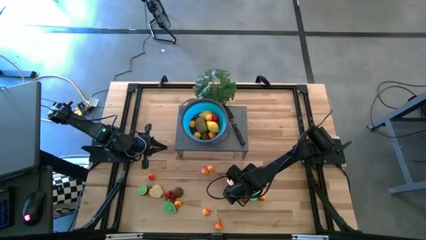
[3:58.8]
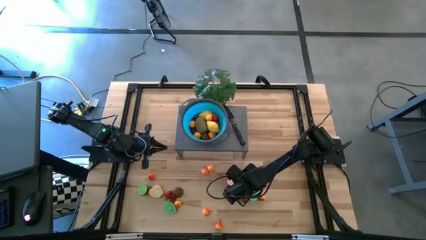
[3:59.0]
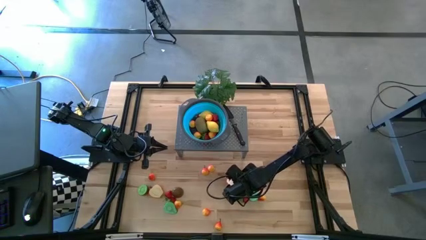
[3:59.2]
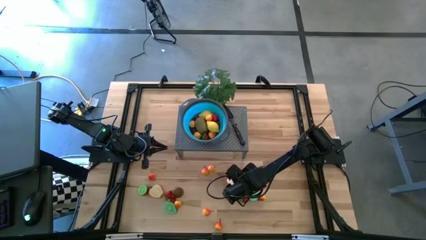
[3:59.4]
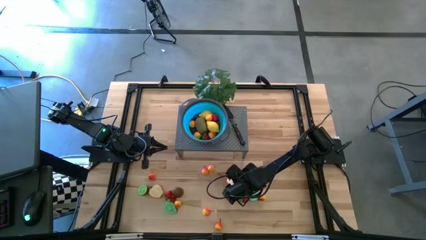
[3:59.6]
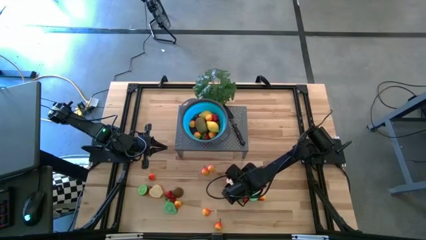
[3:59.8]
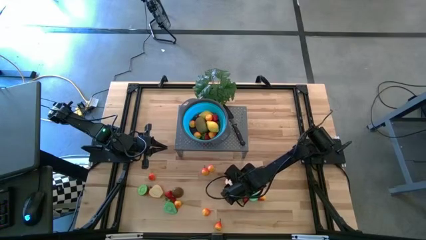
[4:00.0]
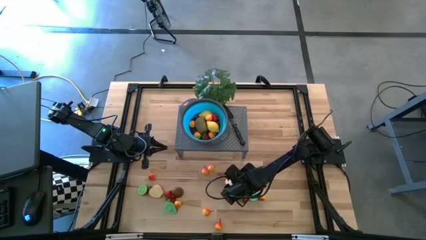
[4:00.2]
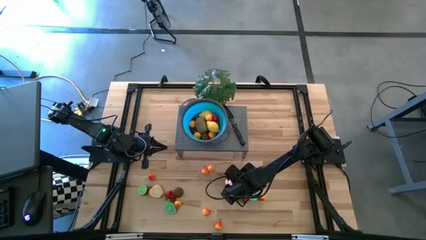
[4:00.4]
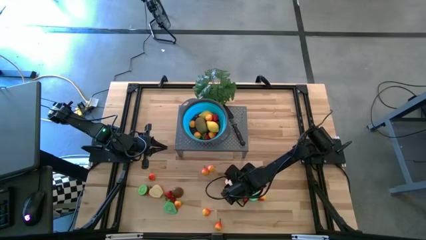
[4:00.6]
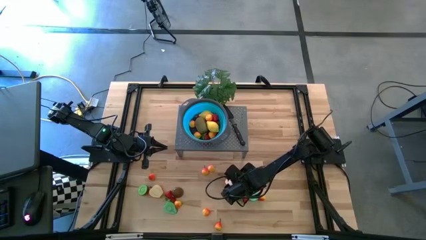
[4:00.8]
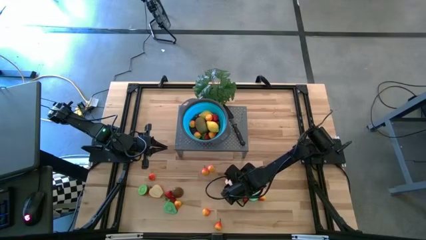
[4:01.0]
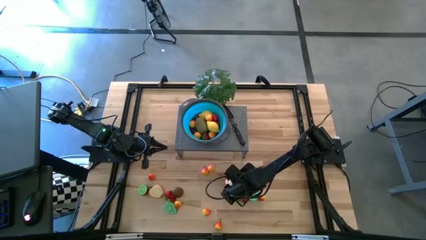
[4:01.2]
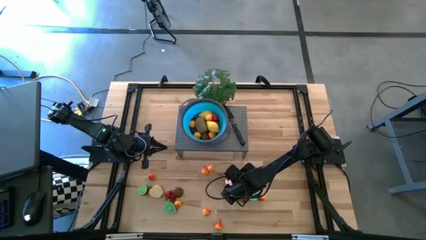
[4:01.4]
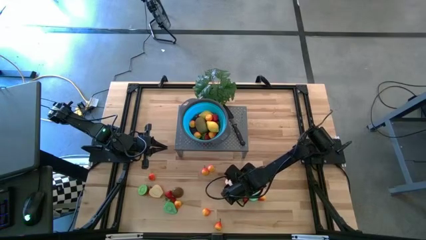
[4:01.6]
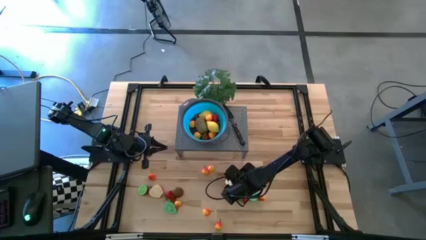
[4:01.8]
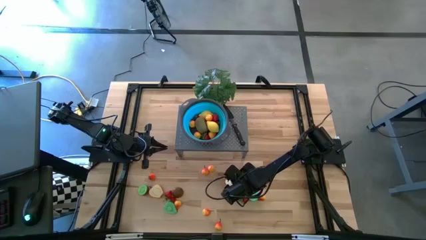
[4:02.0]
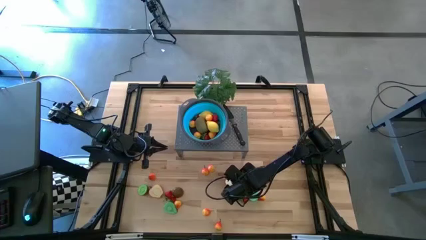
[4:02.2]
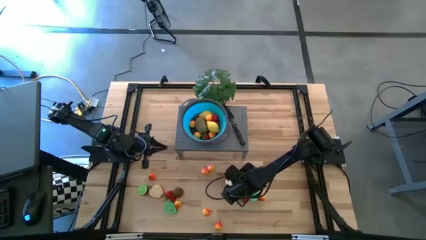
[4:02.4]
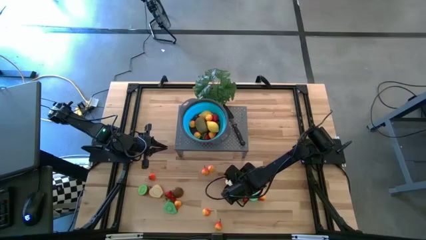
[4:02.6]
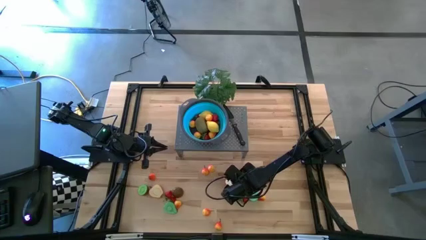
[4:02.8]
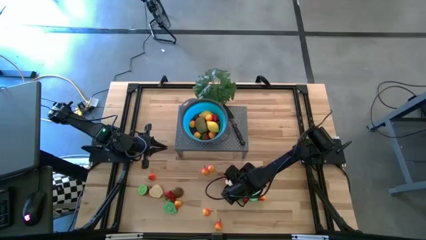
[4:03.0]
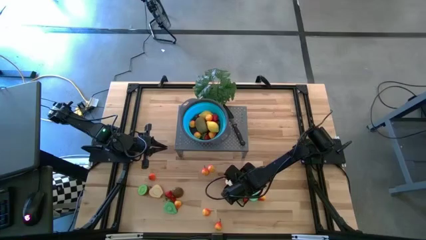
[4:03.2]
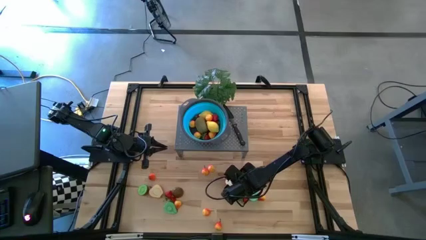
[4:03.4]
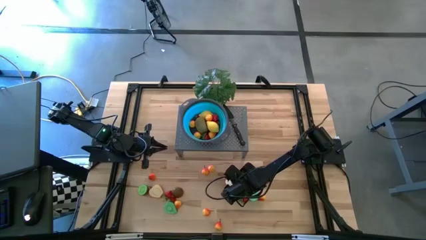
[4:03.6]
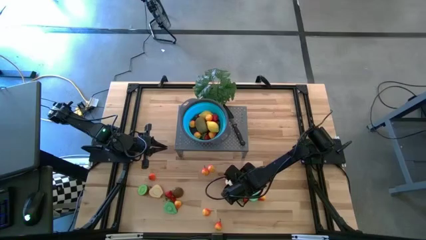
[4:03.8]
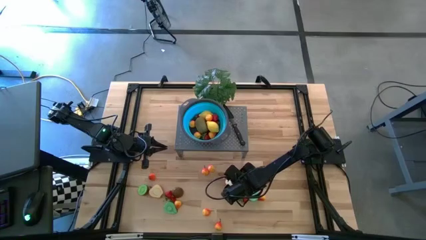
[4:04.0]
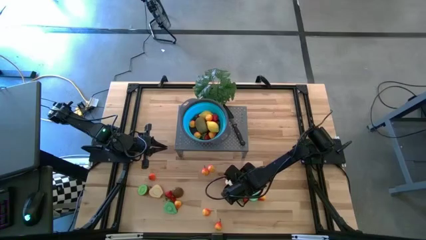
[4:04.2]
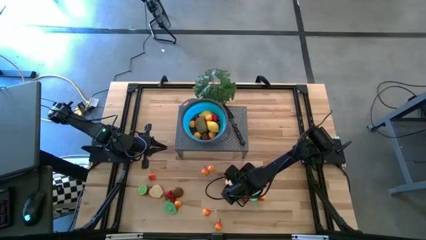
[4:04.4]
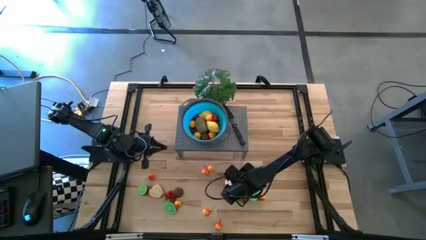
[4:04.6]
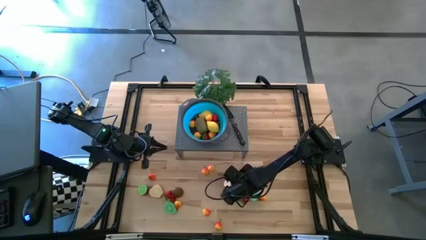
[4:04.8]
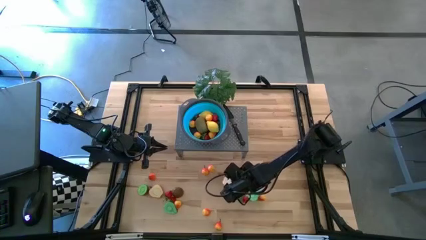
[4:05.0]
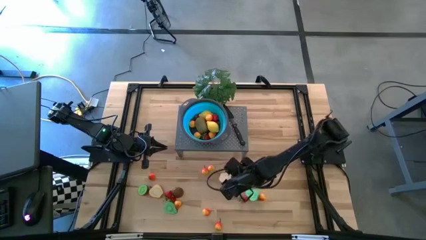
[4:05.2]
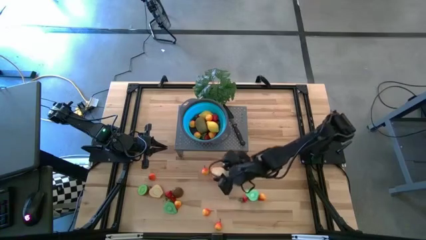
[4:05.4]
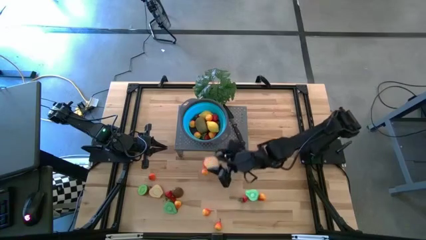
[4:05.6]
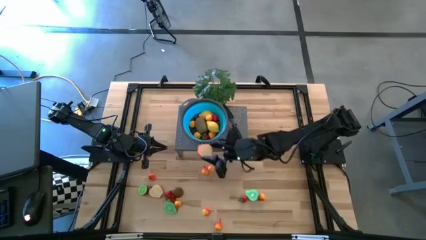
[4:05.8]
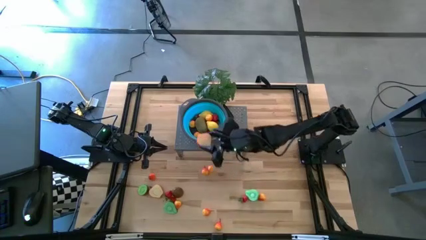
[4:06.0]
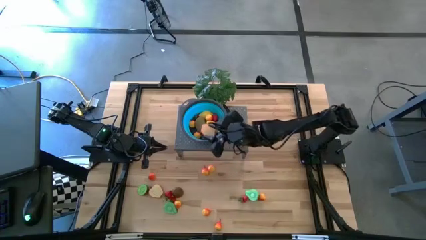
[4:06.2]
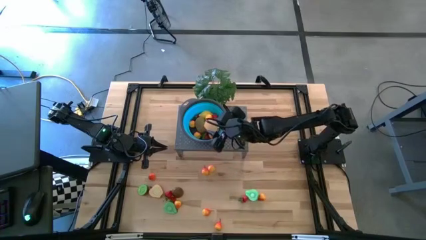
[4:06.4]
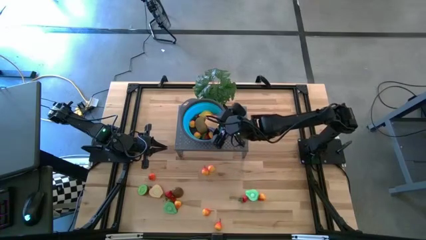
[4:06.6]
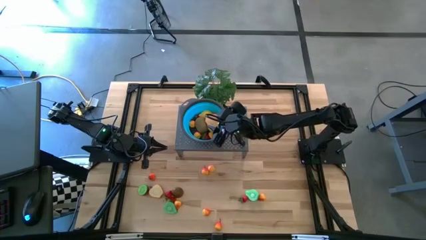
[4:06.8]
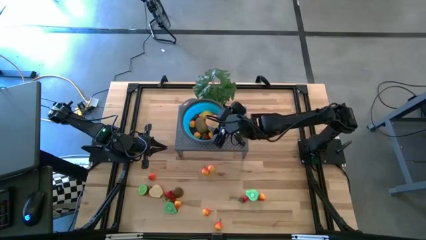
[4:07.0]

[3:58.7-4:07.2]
Task: Pick & Place Fruit
Put the apple into the blue strainer bowl on the shelf

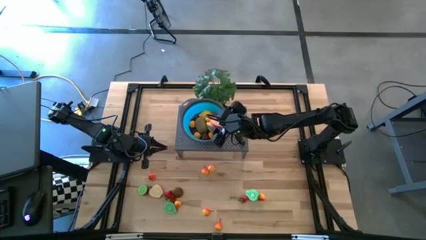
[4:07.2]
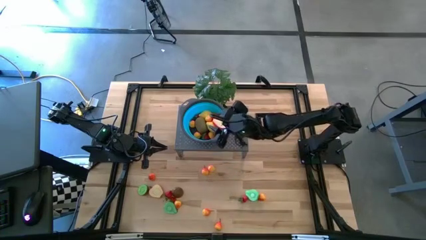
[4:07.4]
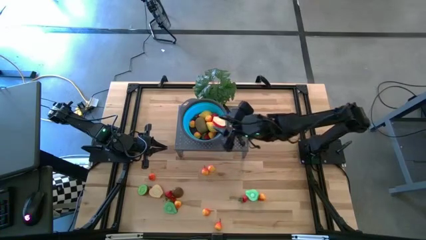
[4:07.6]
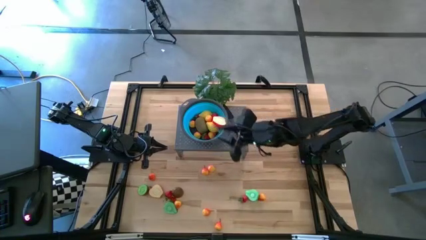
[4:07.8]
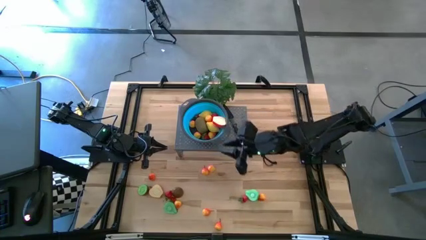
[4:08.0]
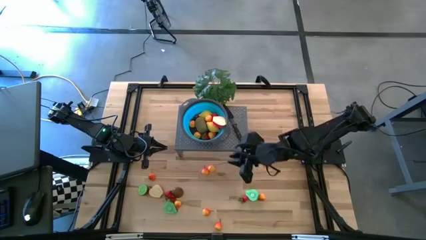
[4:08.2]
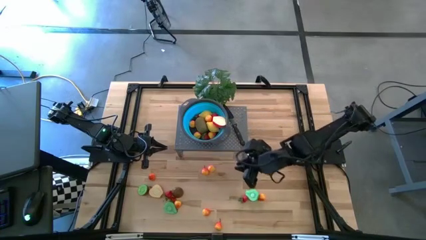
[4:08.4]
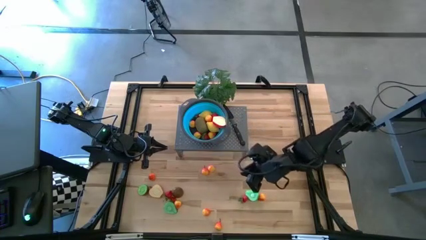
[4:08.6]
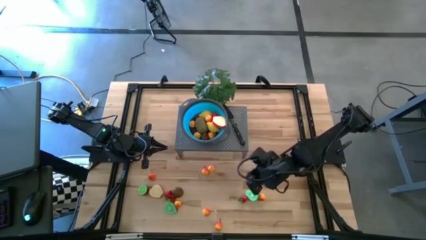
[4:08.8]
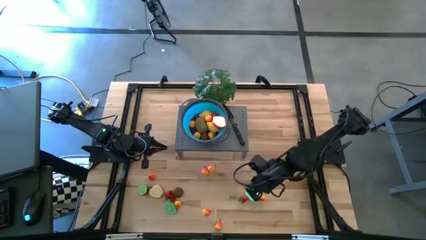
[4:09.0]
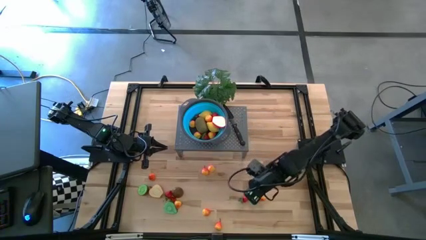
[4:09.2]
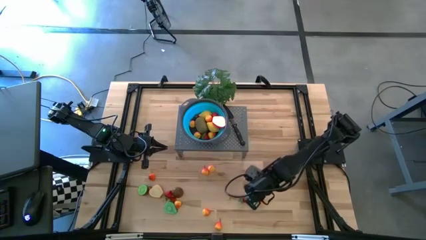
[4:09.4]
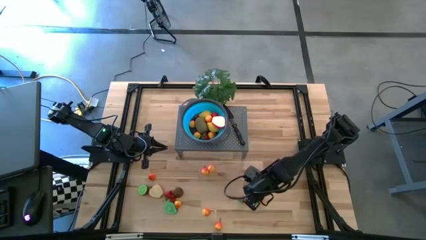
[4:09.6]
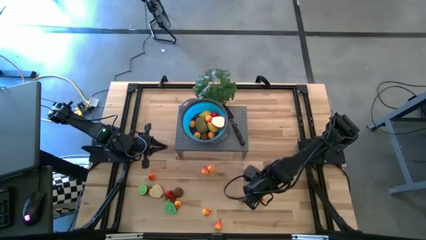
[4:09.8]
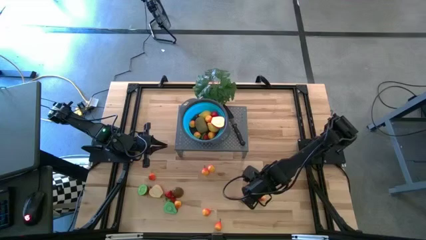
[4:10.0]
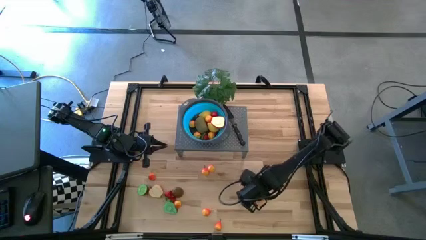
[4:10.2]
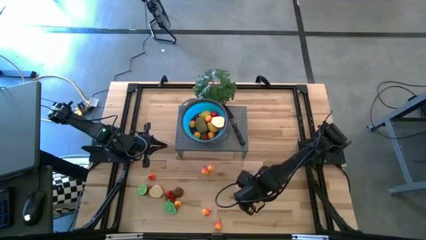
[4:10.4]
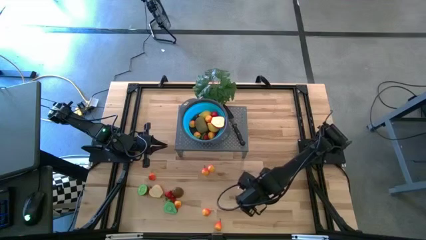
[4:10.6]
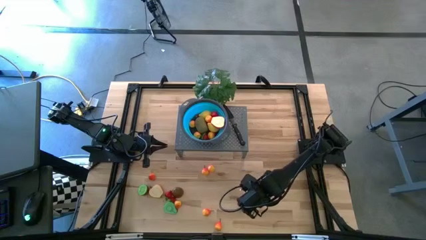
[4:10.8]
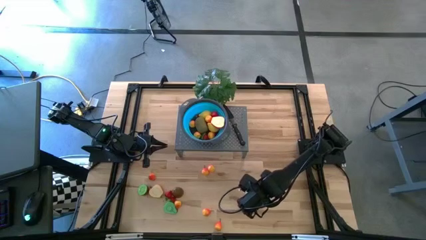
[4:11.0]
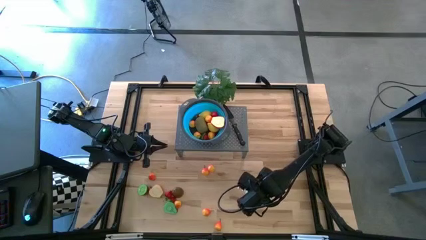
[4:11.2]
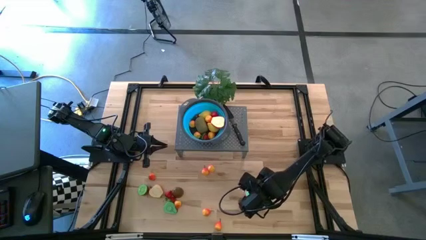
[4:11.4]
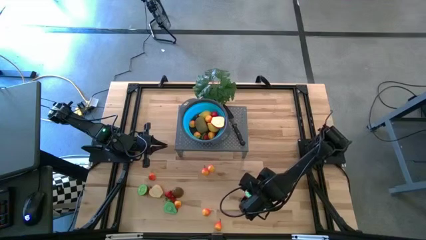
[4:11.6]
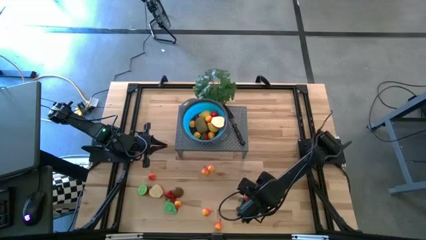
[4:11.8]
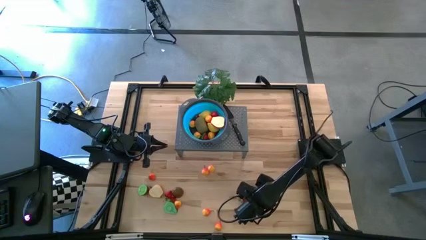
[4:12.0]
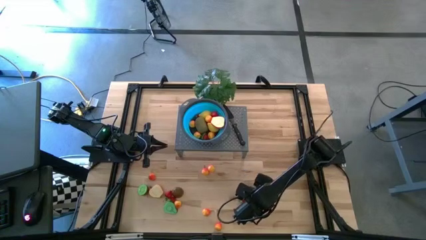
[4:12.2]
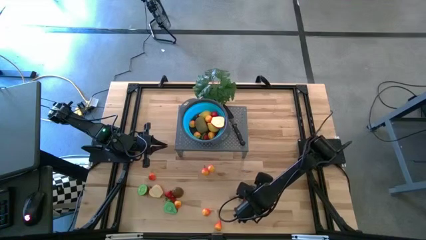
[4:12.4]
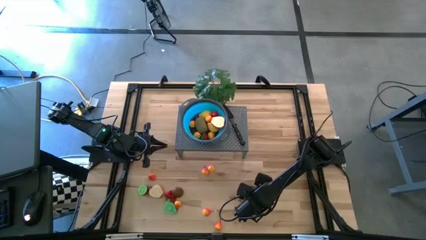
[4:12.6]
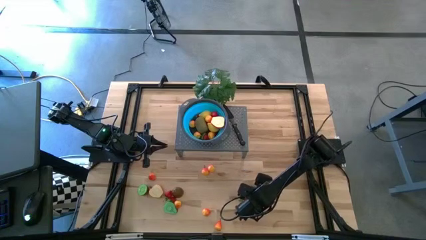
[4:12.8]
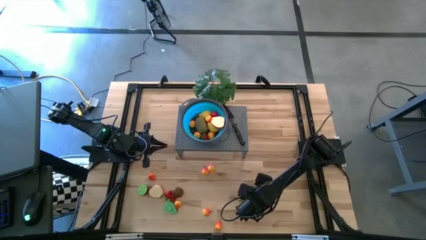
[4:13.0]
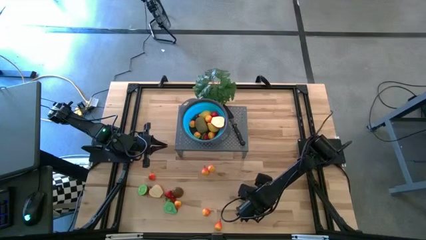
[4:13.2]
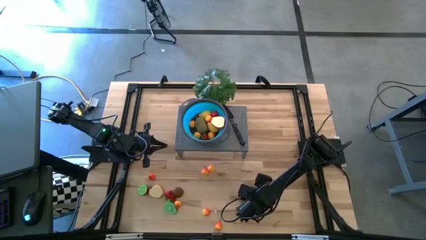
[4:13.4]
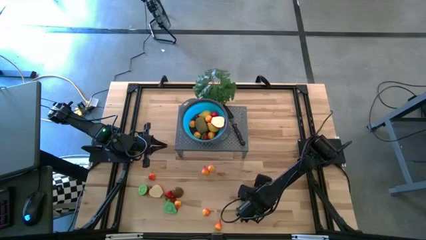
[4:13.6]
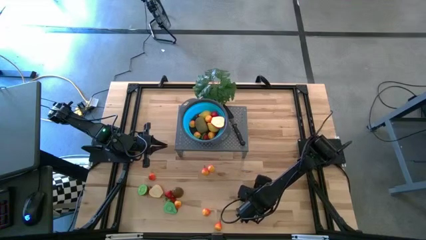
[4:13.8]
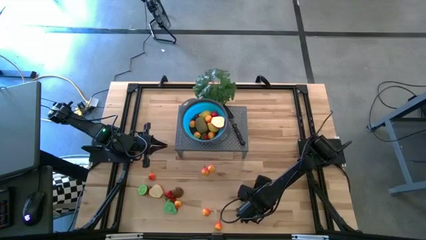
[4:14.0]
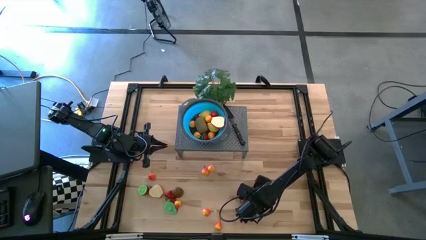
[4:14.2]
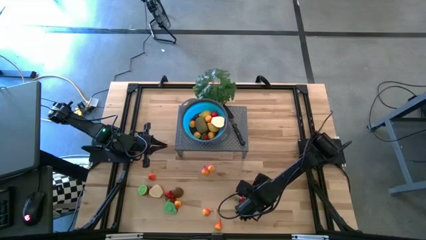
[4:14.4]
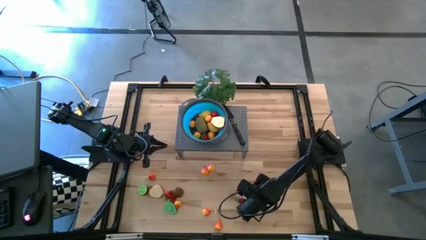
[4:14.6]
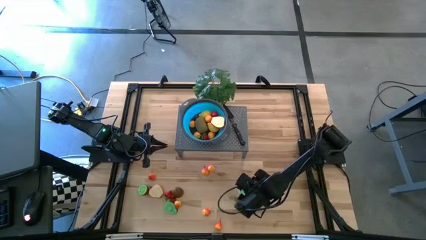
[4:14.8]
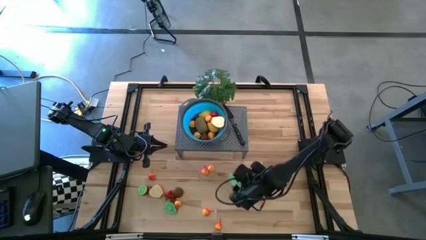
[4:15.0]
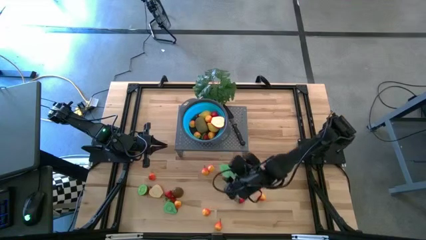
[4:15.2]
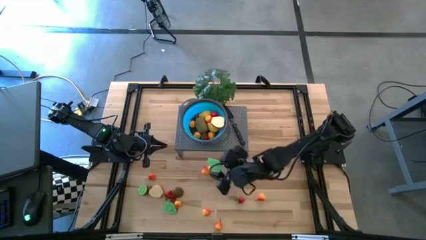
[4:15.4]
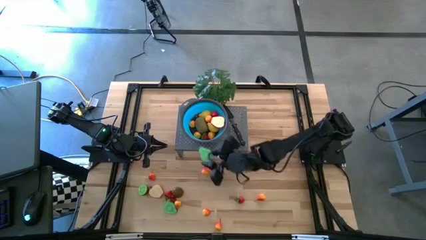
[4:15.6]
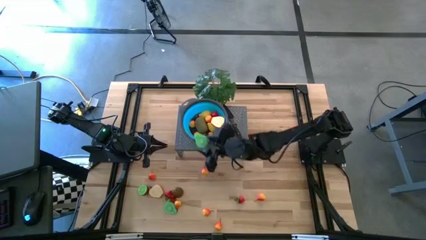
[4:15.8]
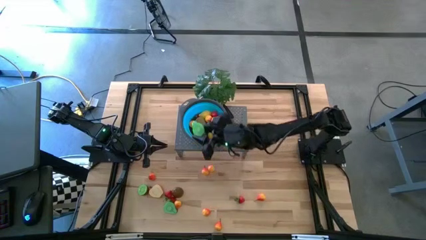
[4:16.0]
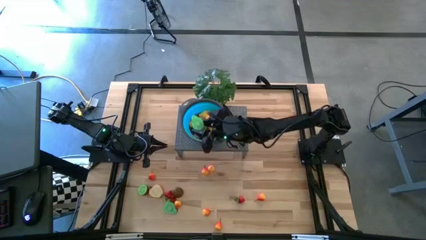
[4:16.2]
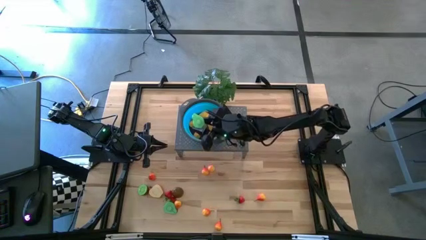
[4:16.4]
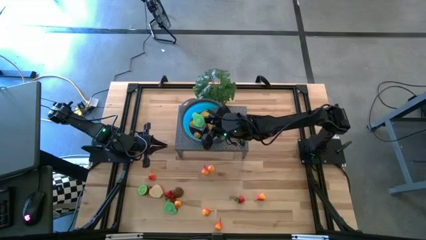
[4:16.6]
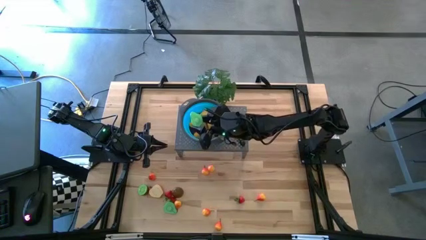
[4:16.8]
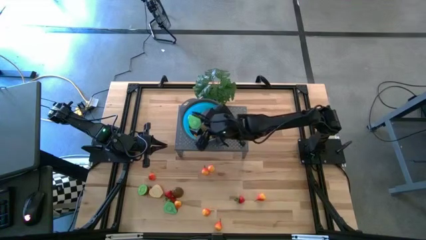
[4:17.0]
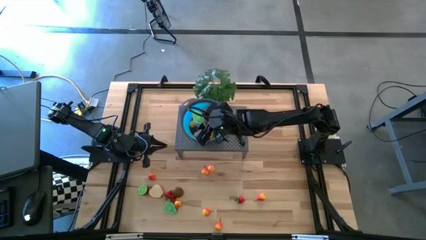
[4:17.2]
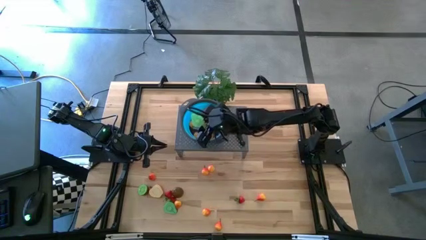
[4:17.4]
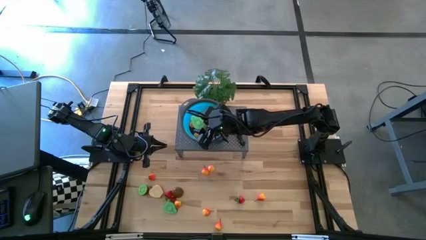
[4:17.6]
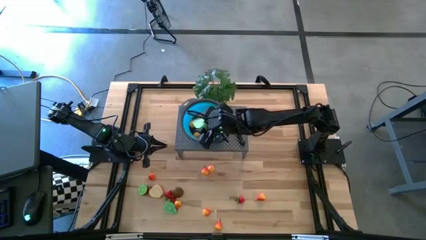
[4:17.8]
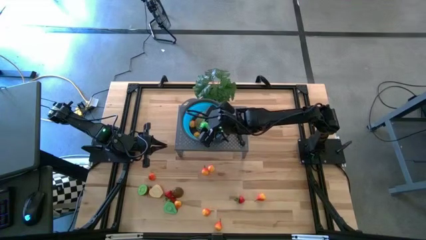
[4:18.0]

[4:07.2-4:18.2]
Put the avocado into the blue strainer bowl on the shelf
